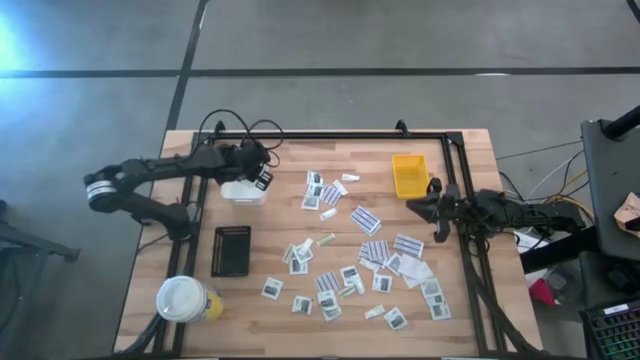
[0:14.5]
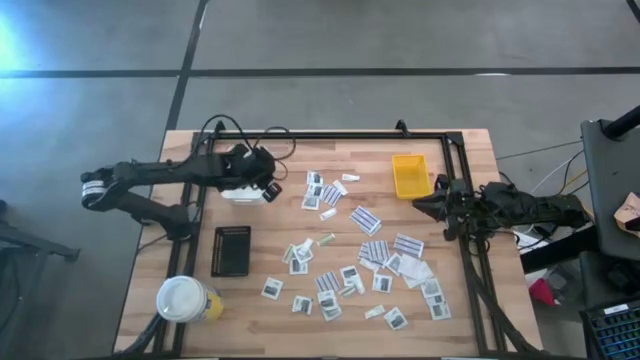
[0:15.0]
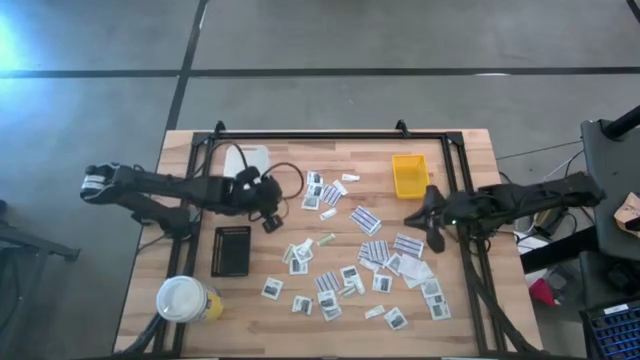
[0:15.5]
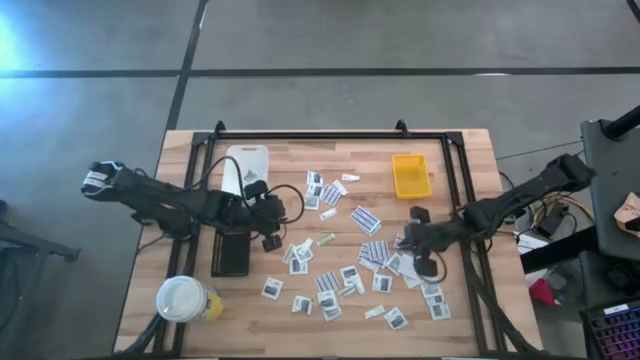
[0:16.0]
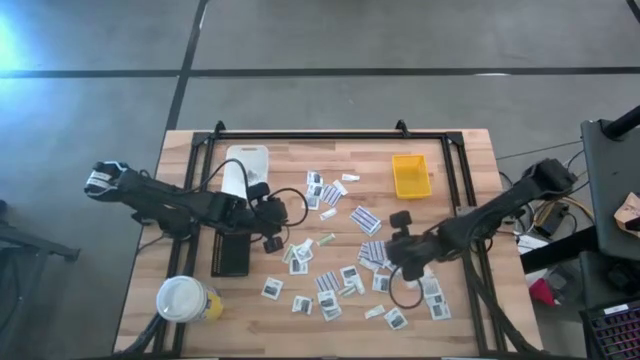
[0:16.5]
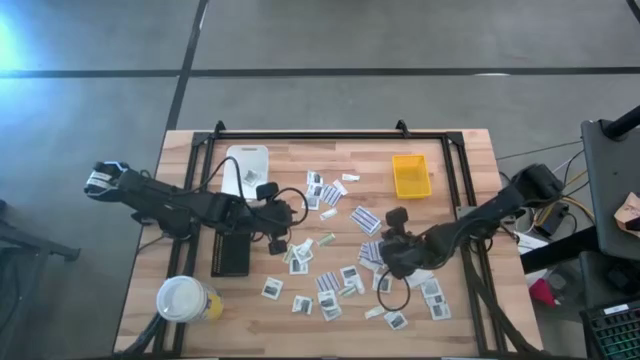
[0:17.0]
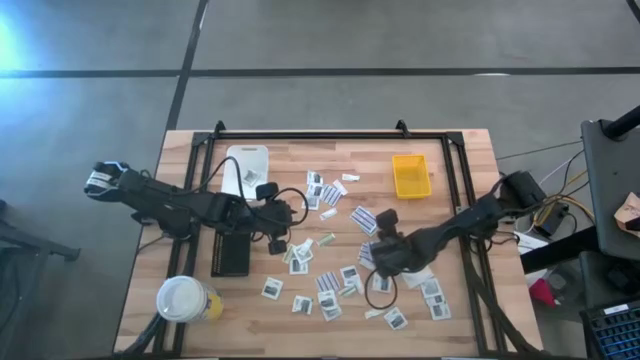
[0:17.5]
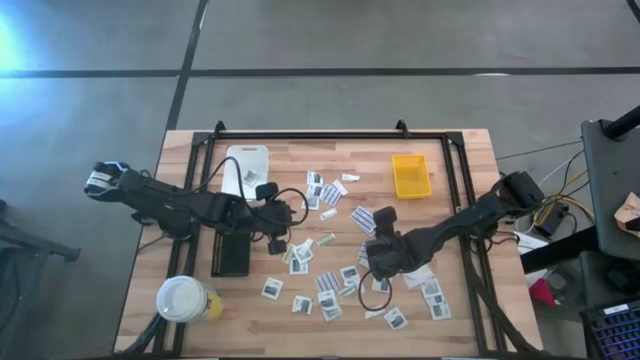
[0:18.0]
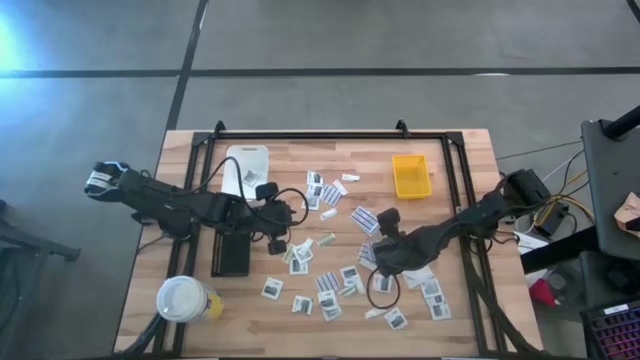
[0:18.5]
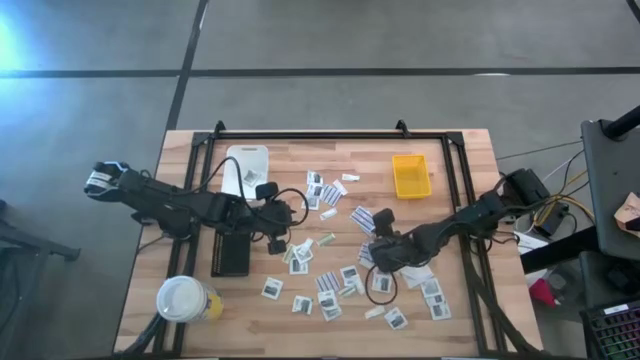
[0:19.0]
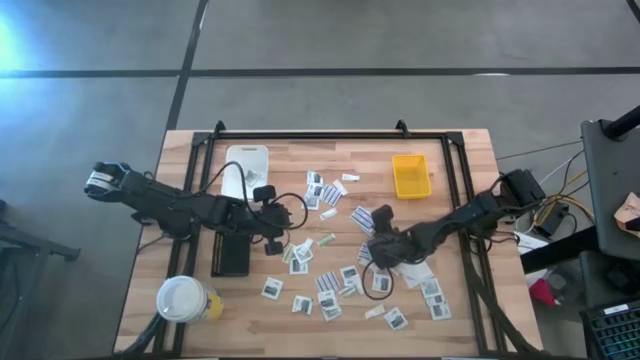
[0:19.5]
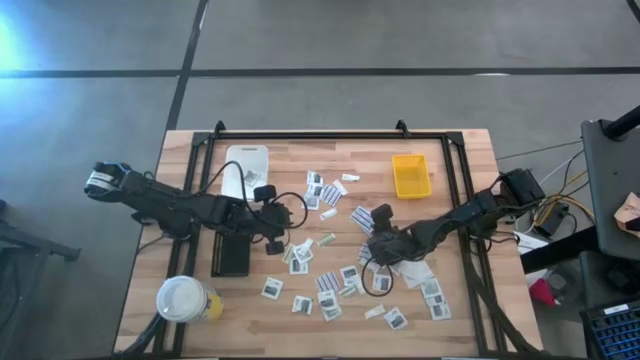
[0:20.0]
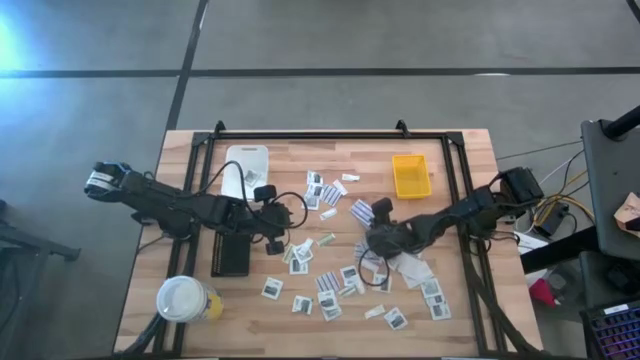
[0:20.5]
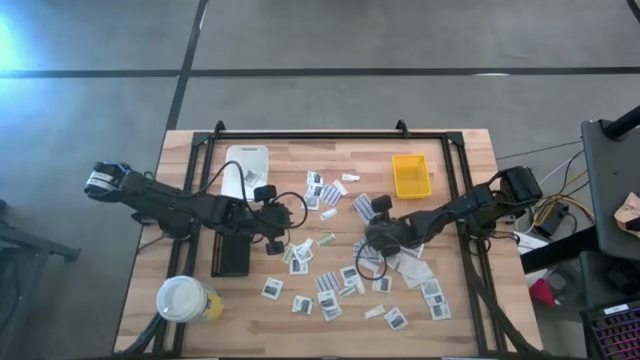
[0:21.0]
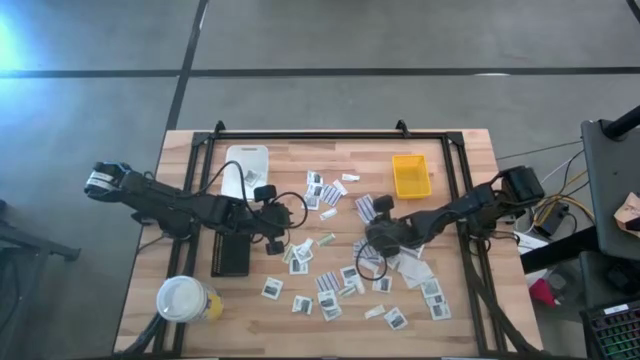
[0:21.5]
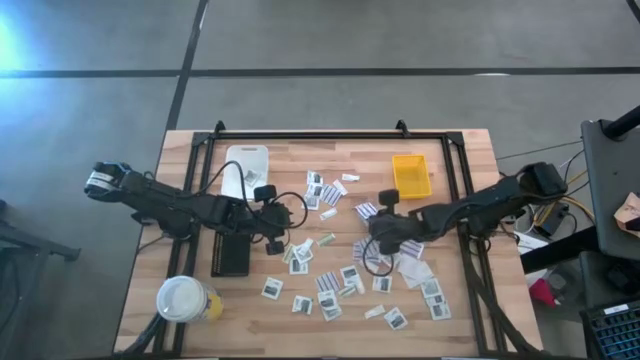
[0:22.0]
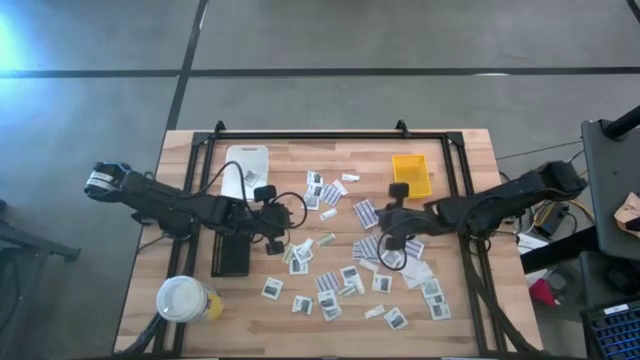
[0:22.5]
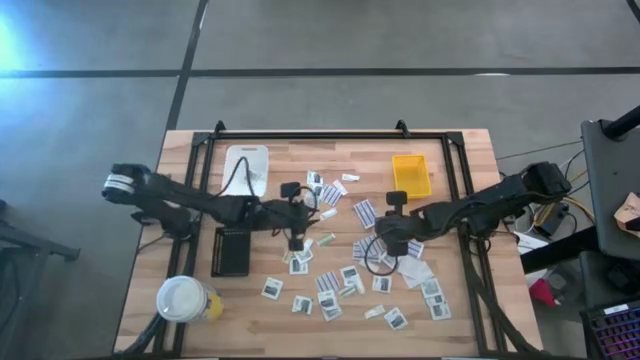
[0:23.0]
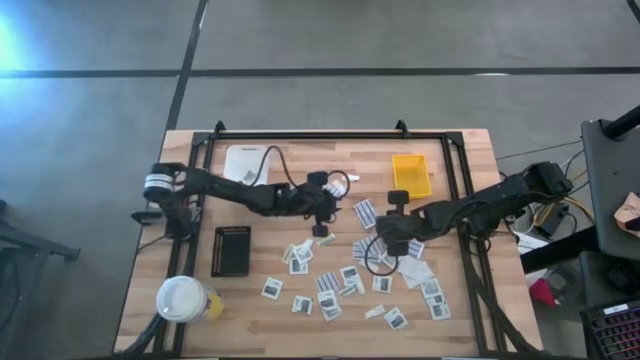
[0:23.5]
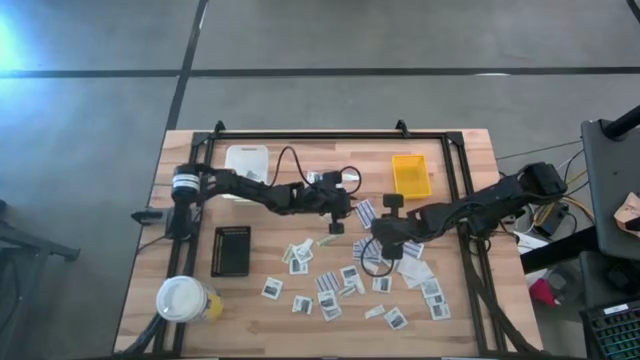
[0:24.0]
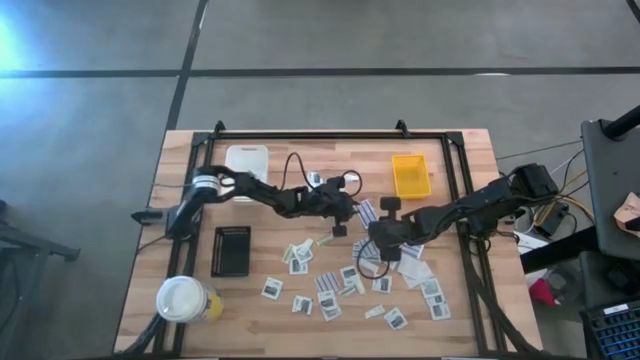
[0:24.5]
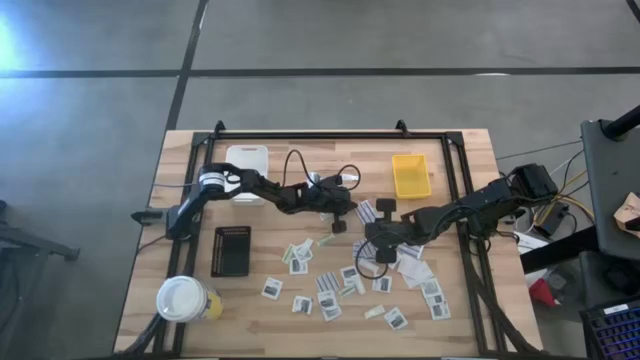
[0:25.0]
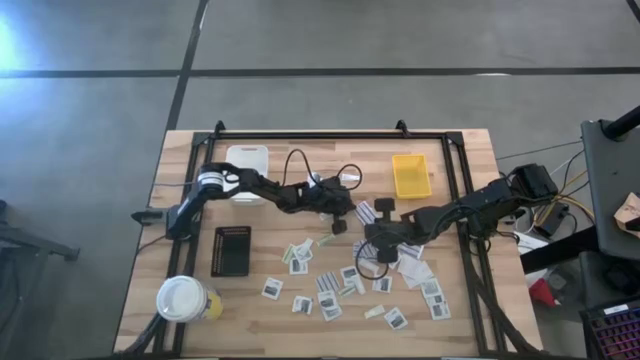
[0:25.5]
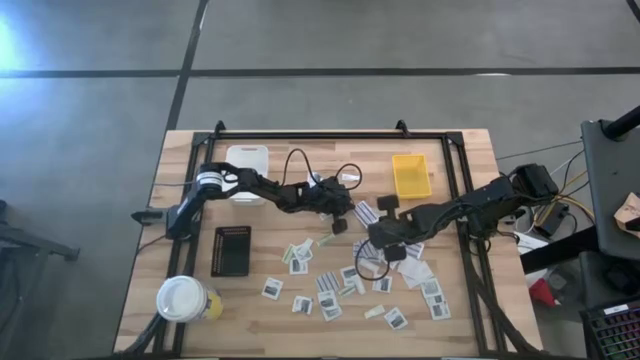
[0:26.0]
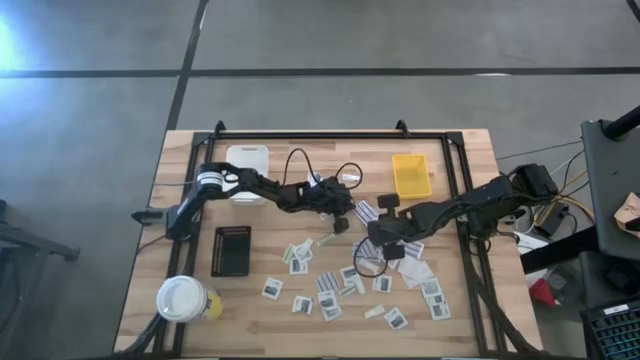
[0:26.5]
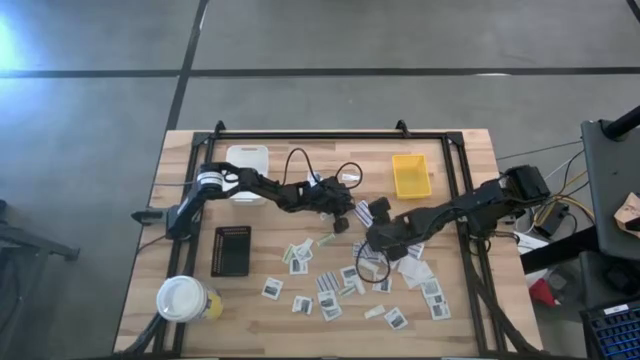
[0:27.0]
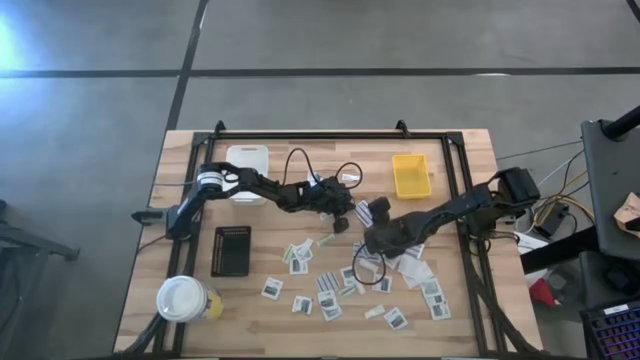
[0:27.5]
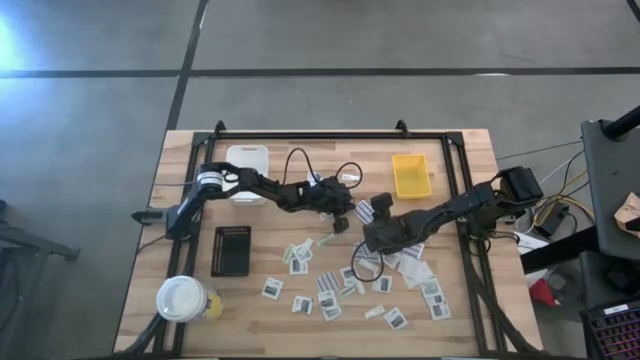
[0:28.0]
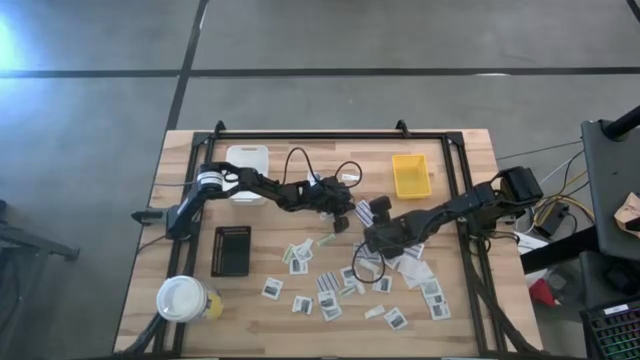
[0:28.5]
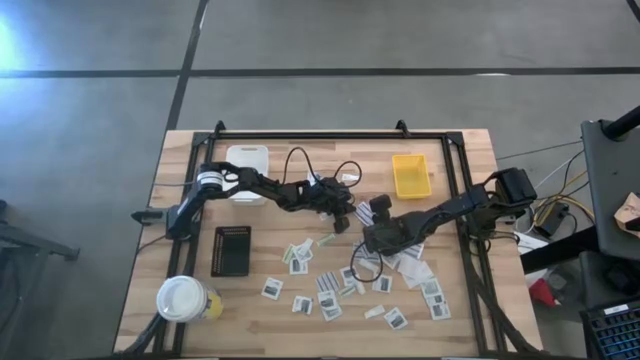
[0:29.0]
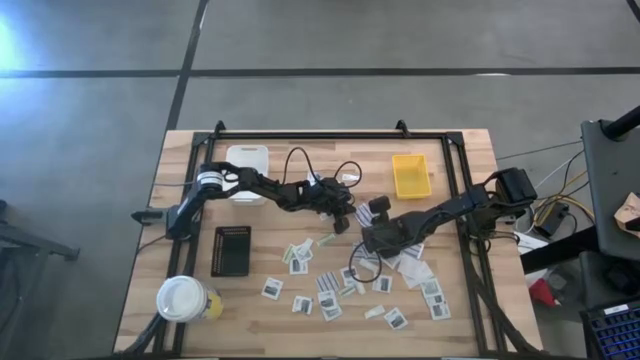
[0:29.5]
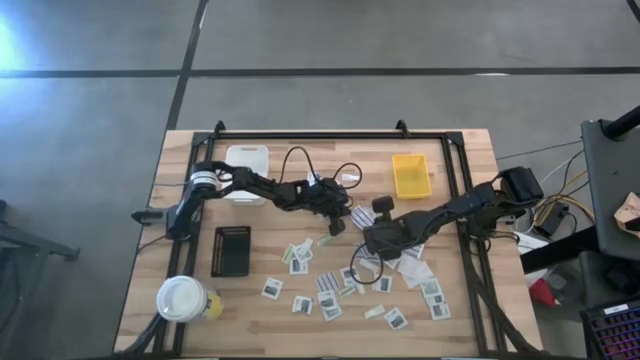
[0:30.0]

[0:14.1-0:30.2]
Task: Pick & Place First Aid Supplies
Put the blue bandage pack into the yellow bin

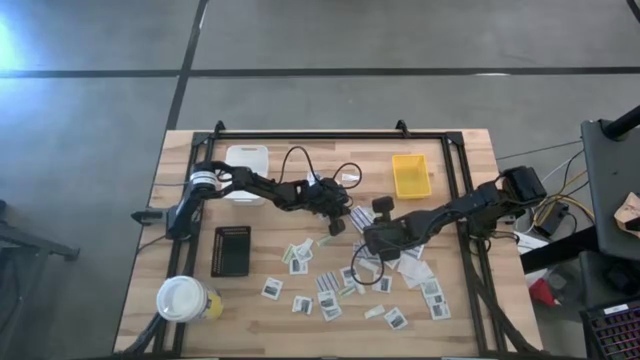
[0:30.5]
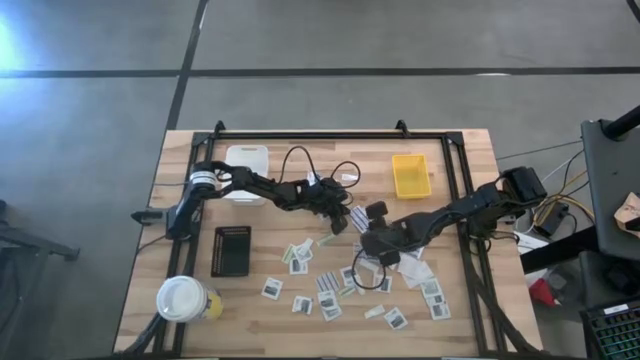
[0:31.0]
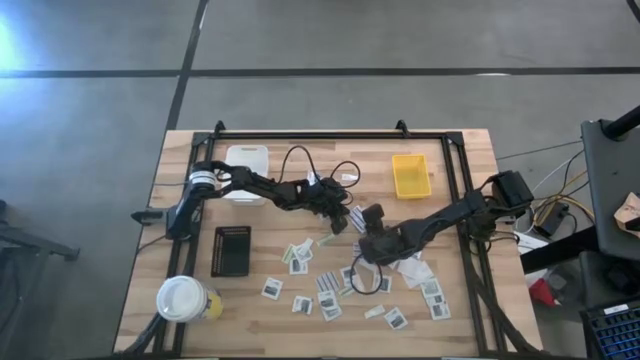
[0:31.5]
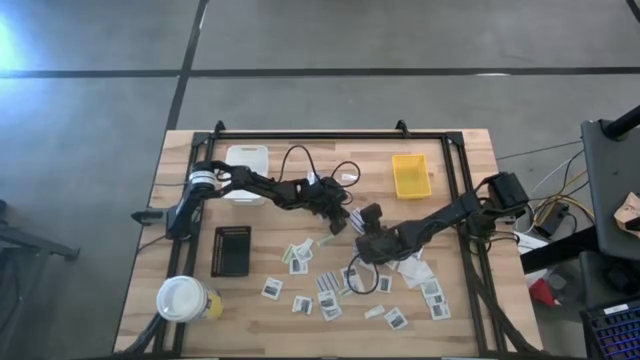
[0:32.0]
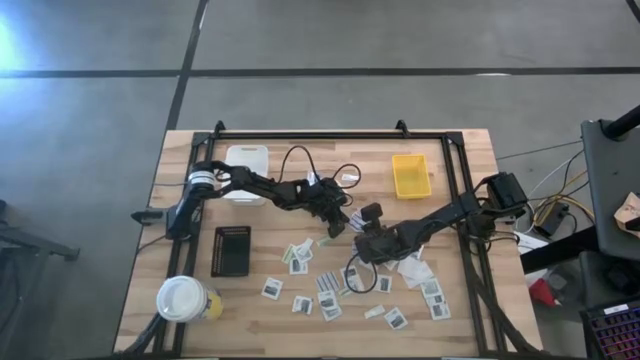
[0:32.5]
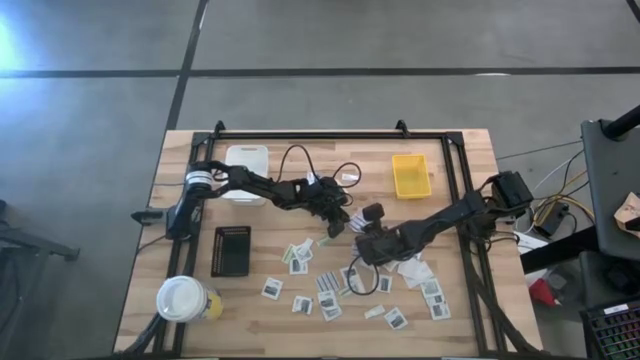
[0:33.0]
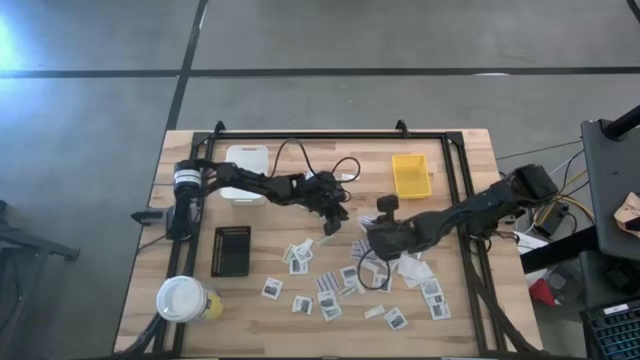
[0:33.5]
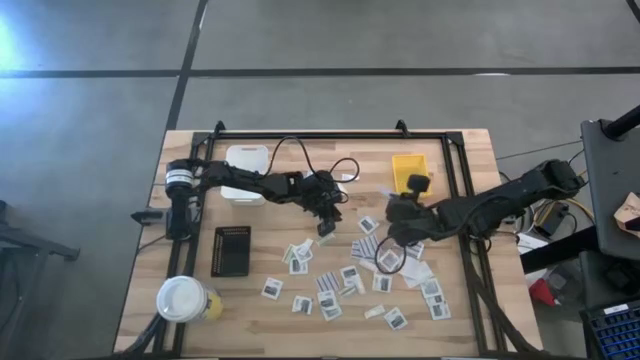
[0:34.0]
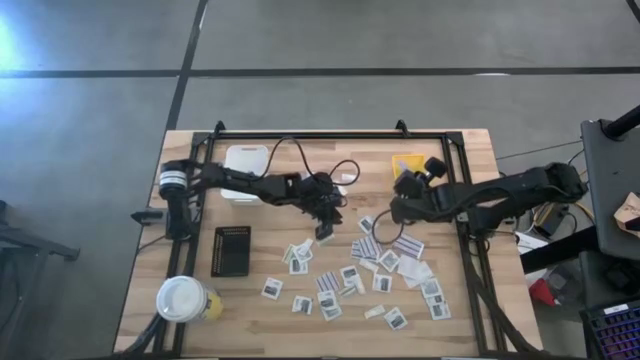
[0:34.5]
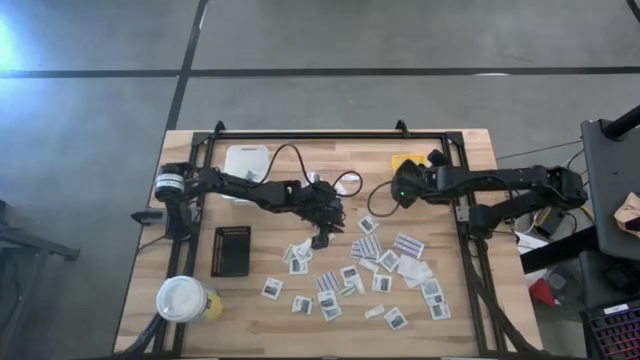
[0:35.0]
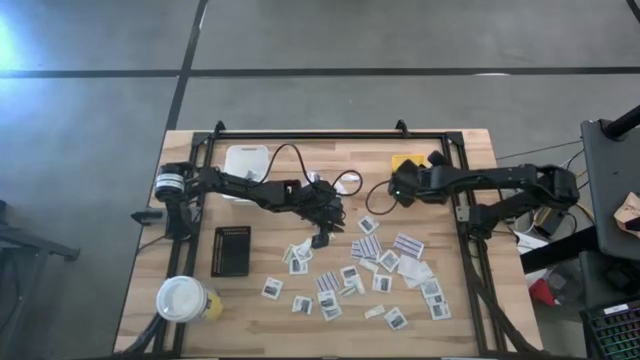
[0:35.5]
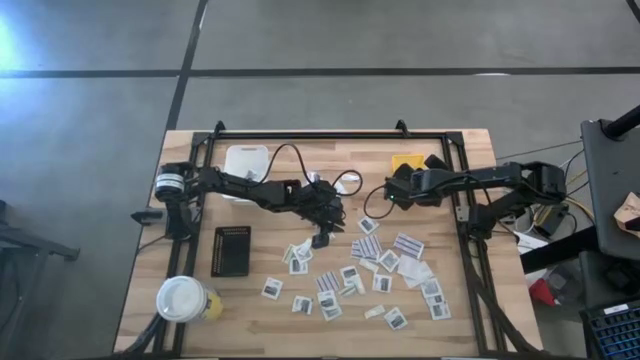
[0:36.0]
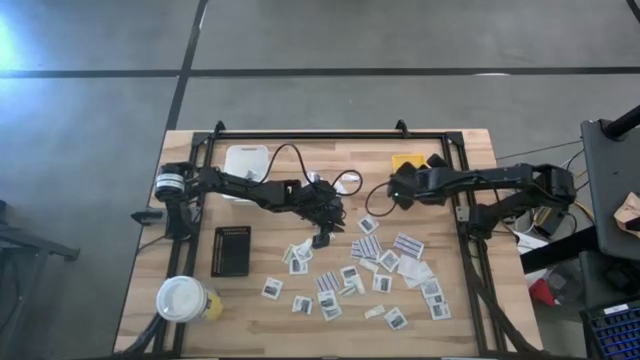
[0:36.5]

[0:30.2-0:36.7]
Put the blue bandage pack into the yellow bin
